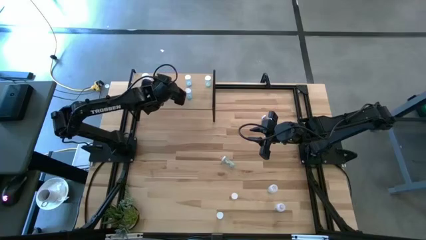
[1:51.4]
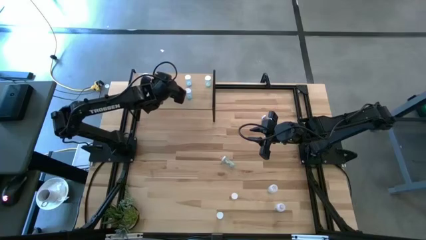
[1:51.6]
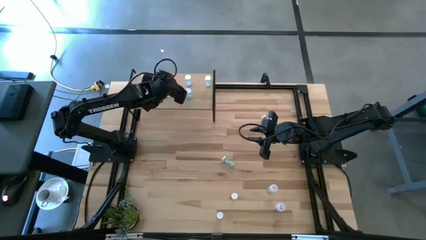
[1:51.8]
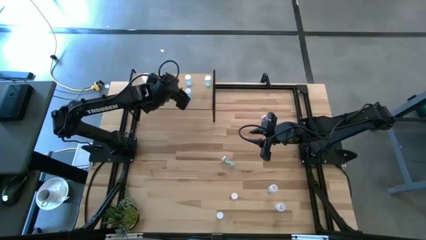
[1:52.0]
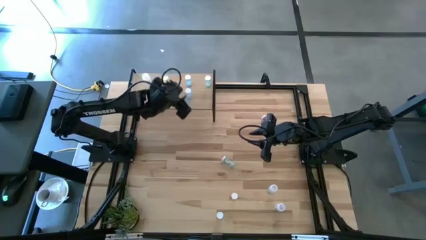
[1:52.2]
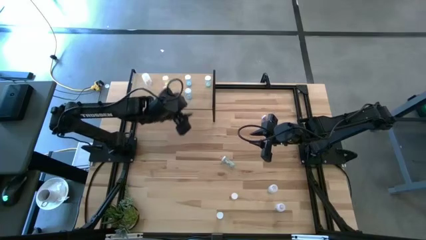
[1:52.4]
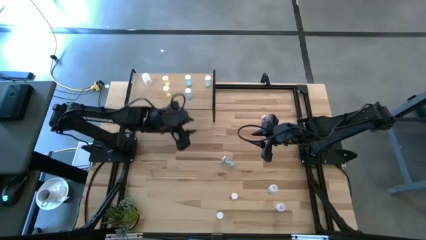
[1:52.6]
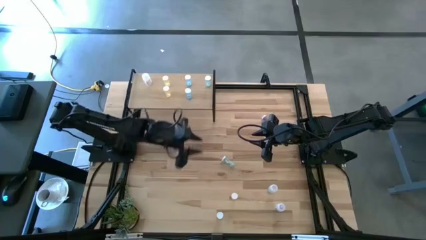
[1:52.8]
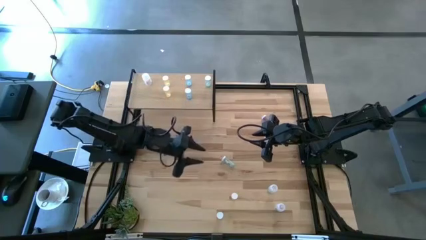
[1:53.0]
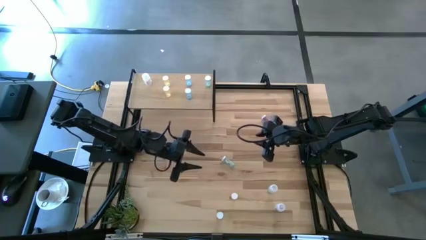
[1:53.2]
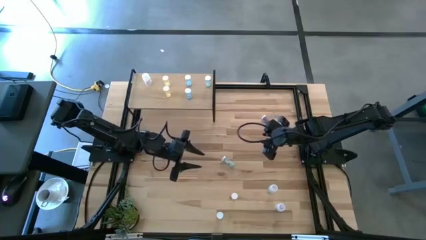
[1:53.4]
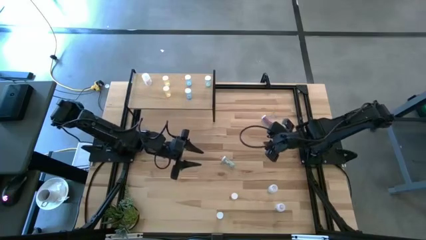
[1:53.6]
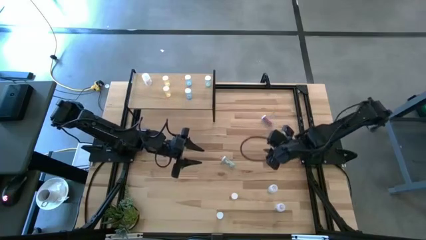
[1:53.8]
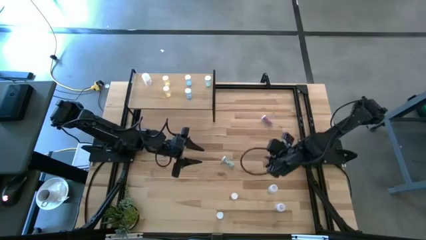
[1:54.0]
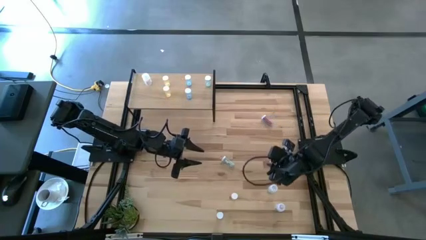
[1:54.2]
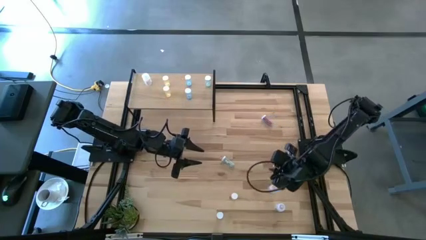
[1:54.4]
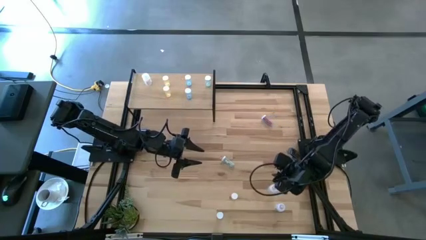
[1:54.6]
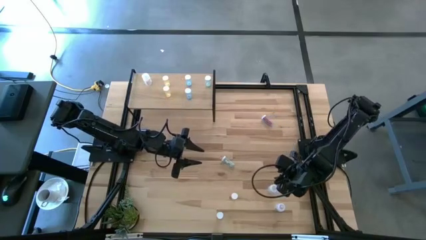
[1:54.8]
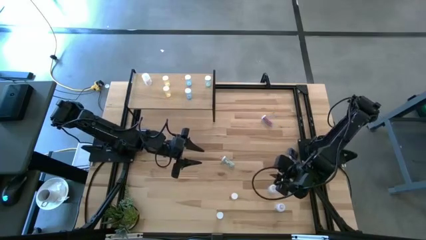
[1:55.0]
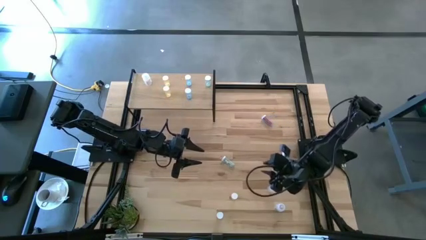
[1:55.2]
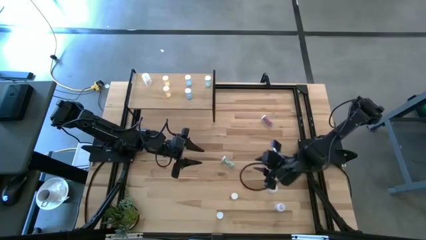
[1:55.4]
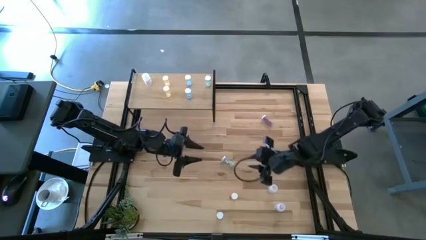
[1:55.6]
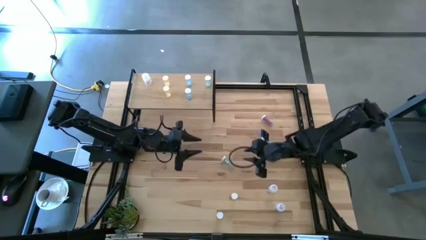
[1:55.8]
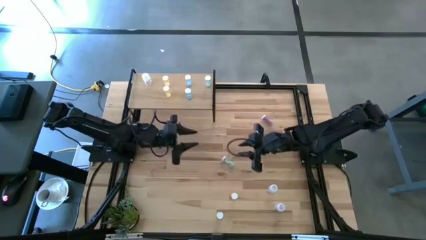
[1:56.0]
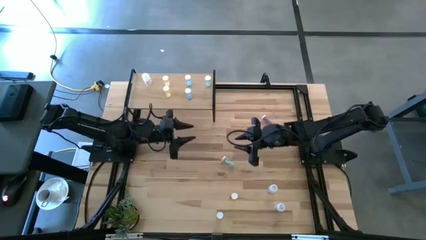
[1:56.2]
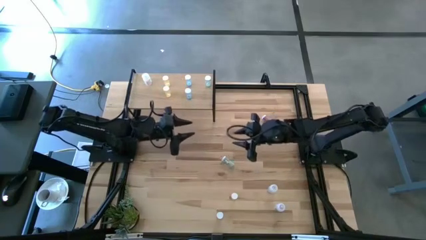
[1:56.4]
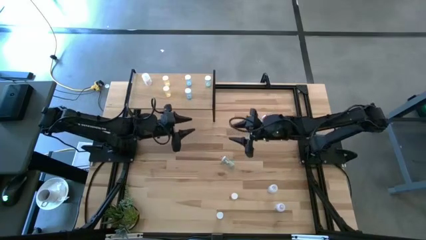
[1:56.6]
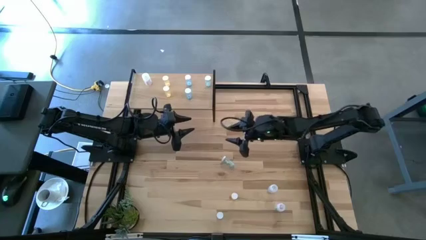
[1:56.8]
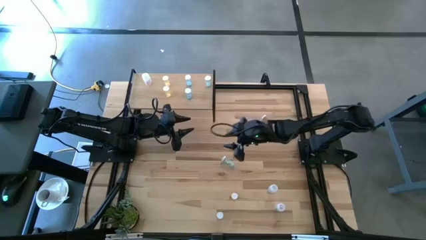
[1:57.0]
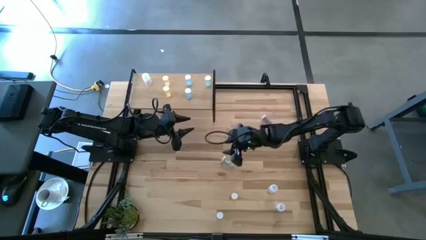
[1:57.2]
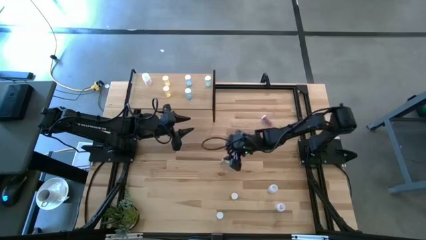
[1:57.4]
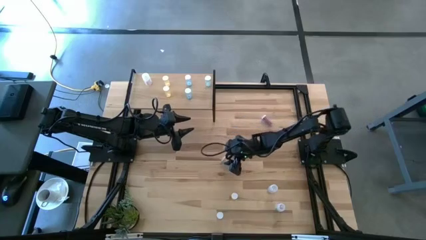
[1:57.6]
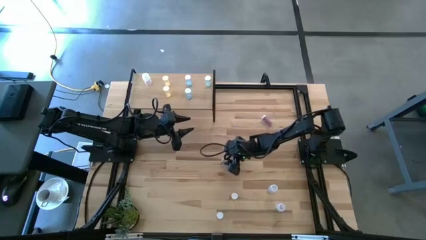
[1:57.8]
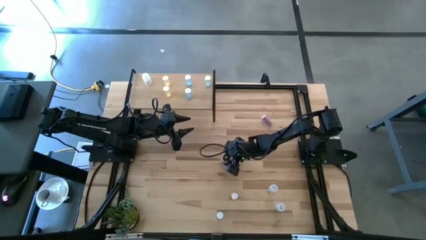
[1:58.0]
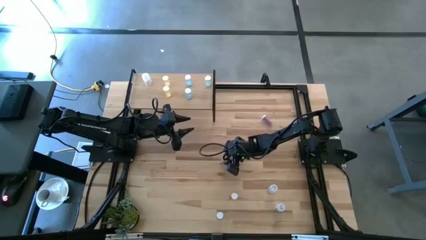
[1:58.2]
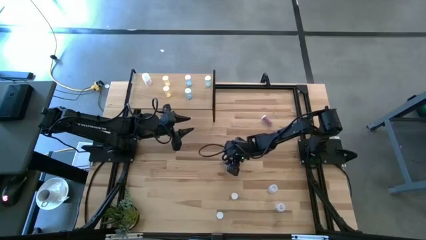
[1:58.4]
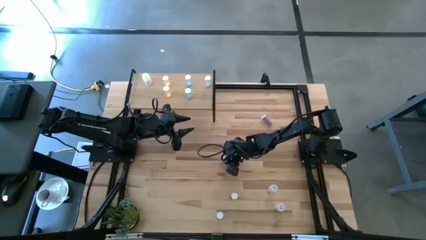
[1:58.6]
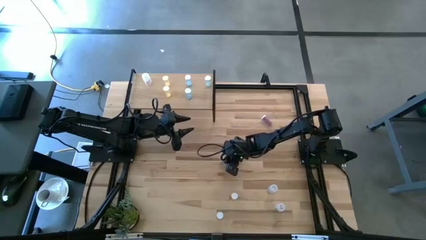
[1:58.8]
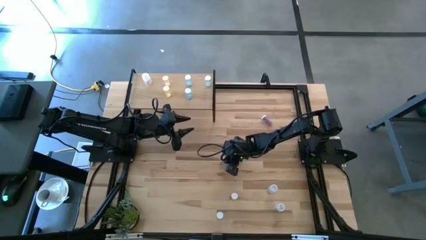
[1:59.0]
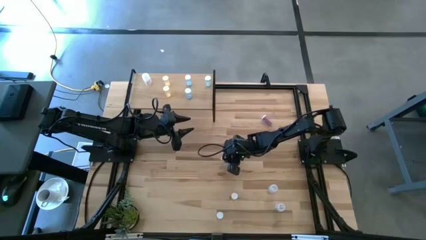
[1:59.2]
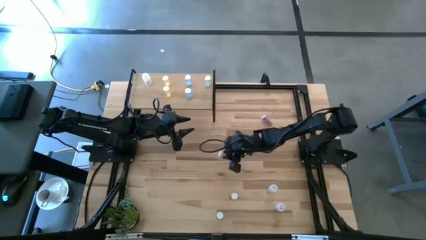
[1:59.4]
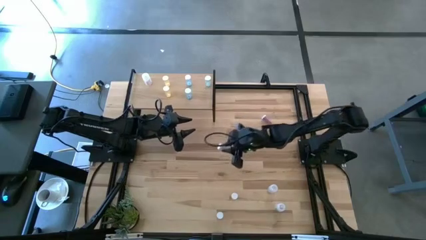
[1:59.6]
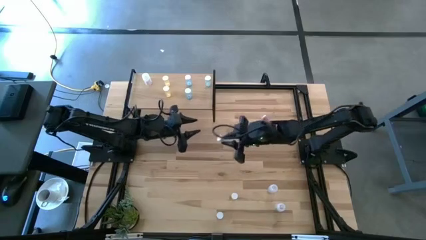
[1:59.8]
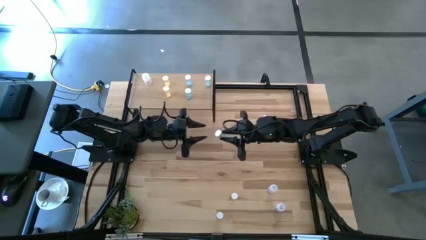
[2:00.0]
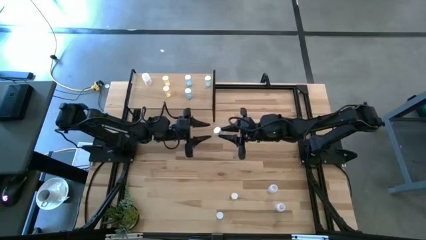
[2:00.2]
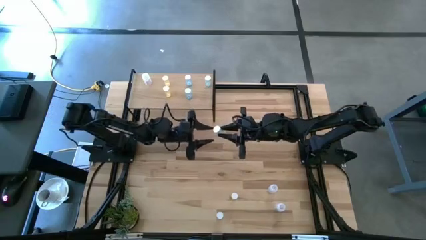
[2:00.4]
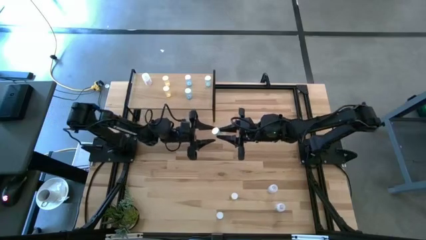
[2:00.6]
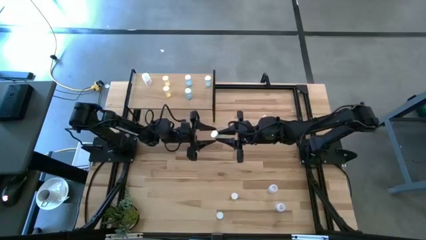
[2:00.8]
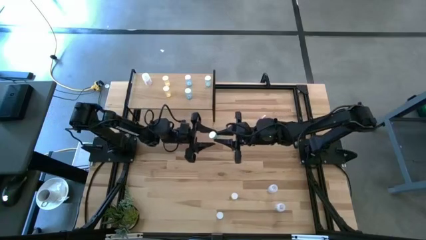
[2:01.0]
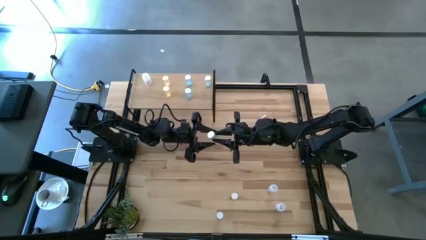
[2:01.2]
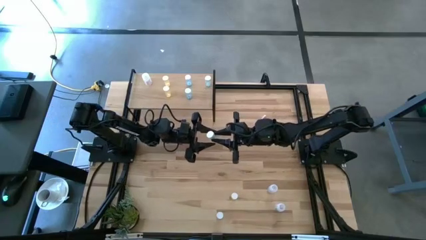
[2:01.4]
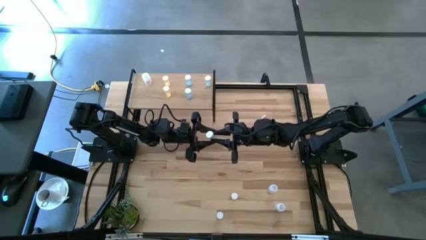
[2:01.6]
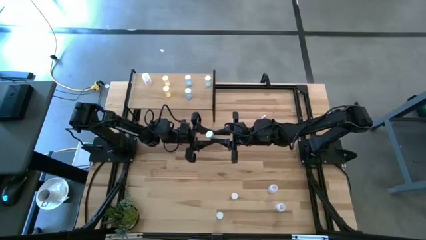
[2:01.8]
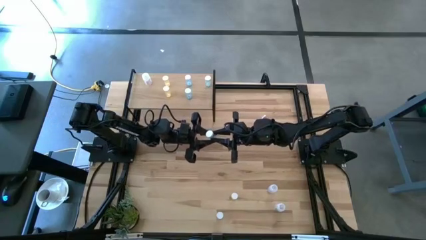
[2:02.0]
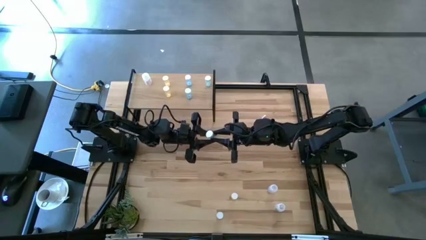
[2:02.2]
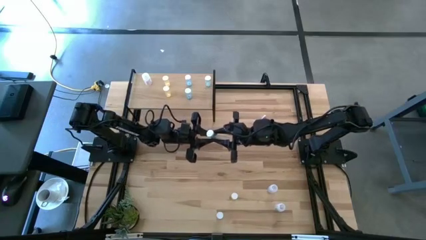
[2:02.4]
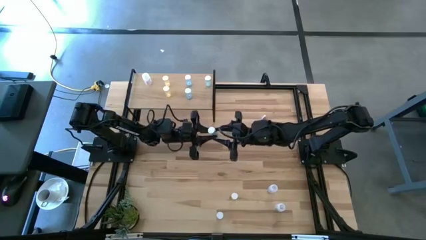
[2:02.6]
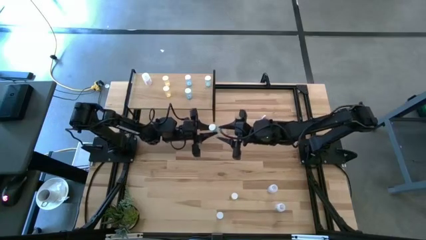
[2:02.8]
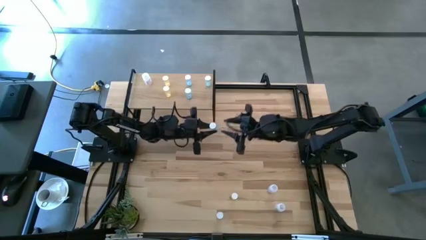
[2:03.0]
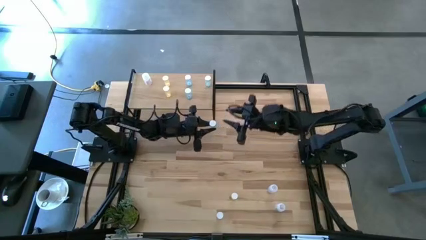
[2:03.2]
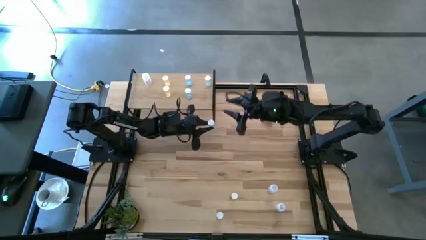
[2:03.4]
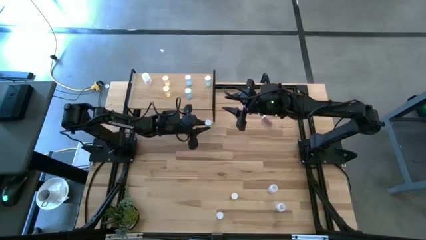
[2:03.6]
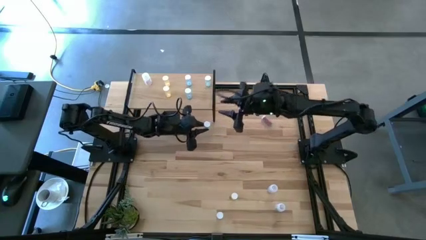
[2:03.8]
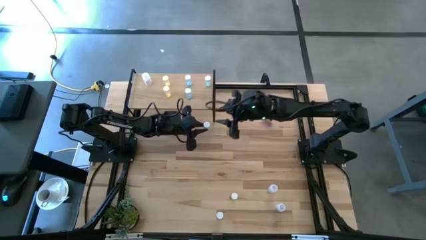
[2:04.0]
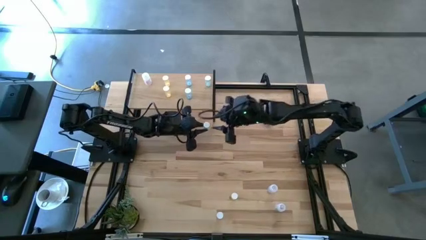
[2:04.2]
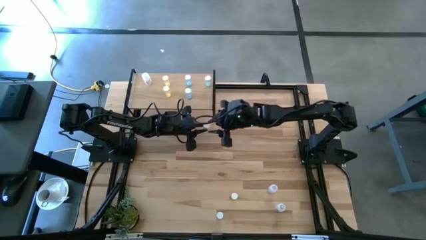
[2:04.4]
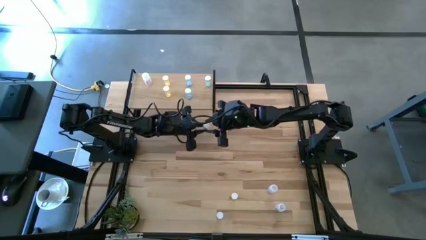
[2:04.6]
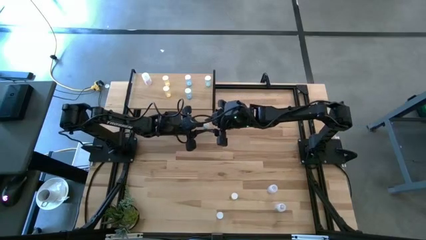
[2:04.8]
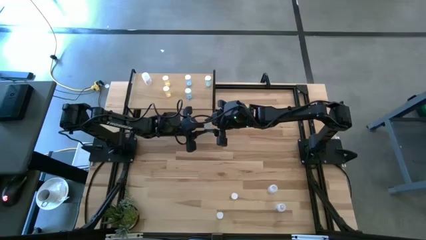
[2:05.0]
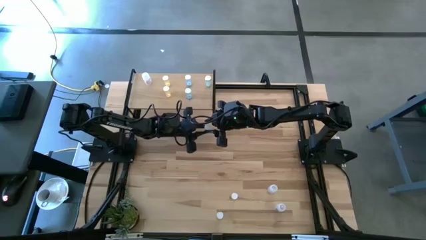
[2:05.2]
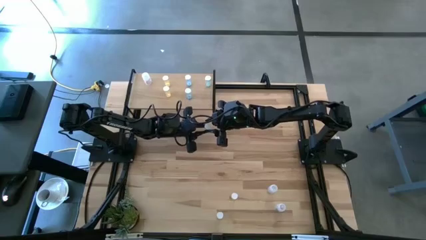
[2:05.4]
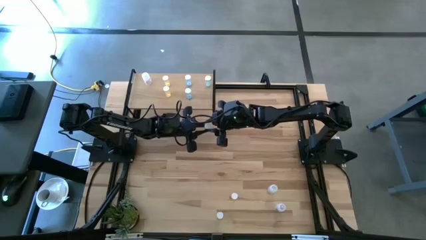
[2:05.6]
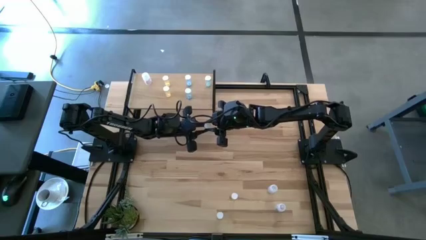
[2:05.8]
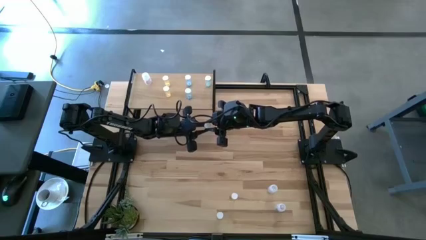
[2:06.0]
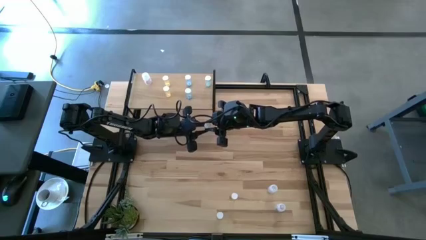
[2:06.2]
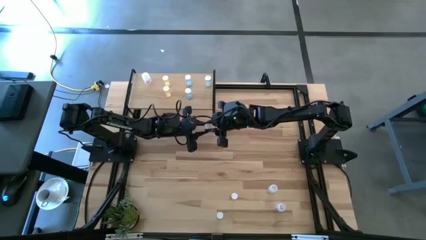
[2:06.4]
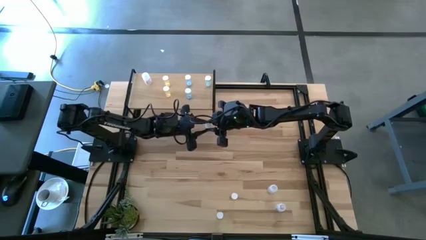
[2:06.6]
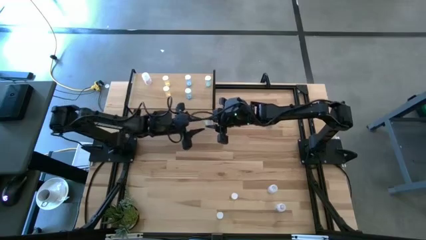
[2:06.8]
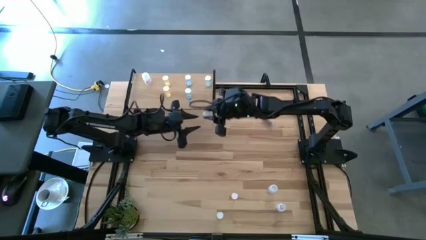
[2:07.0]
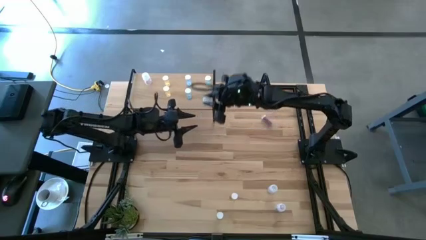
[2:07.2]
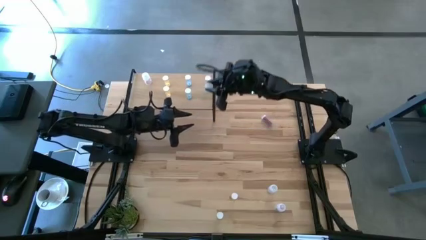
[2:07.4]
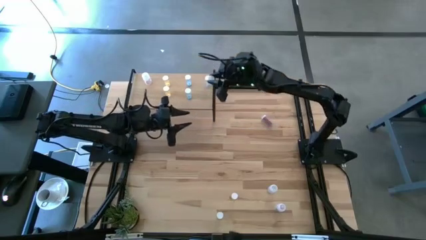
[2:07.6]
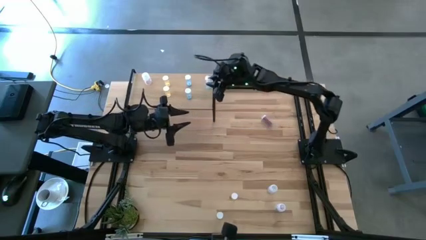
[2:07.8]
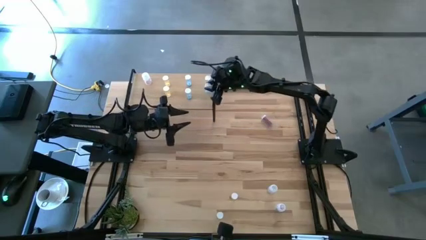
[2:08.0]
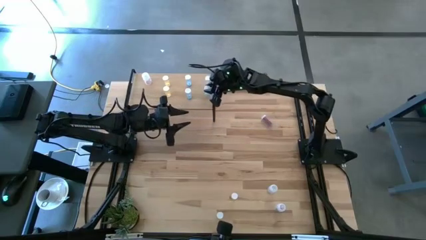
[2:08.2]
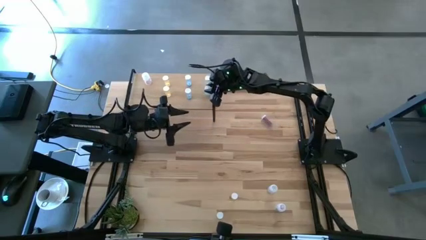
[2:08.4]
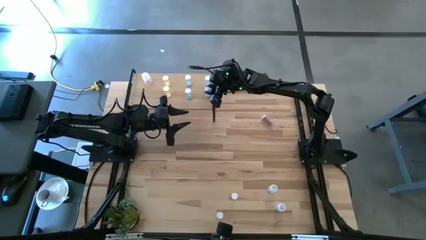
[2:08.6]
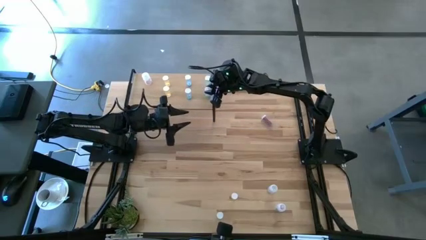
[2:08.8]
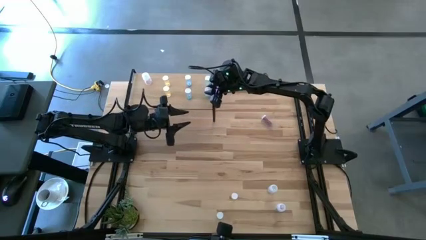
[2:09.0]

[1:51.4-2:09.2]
Task: Pick and place medicine bottles onto shelf by color
Put the top green pill bottle on the shelf aligned with the other green pill bottle
